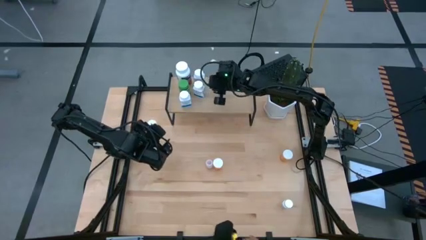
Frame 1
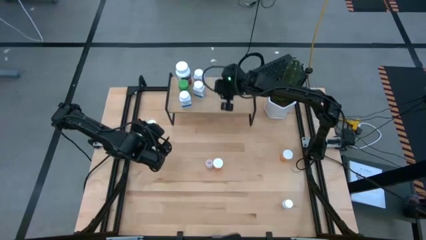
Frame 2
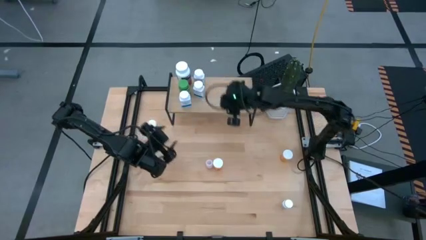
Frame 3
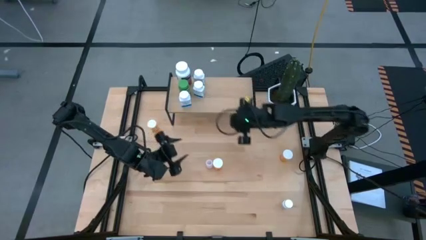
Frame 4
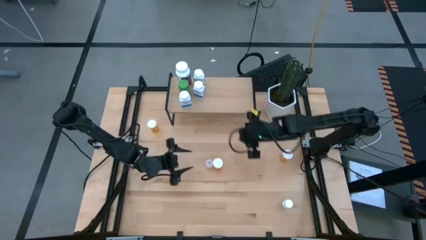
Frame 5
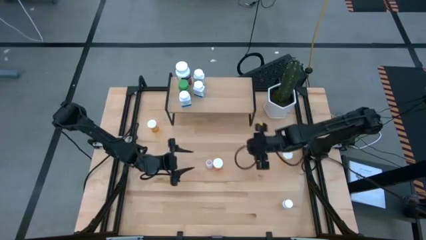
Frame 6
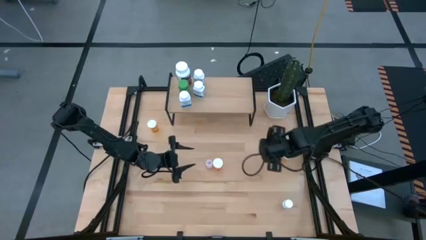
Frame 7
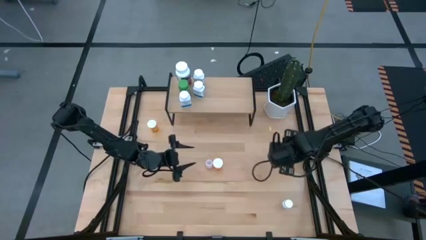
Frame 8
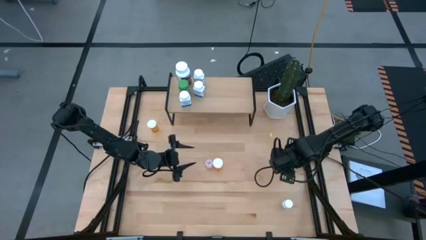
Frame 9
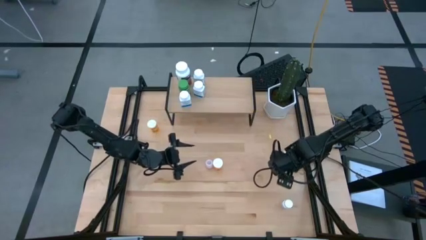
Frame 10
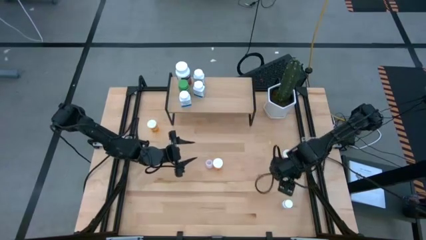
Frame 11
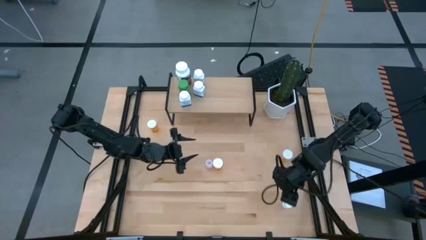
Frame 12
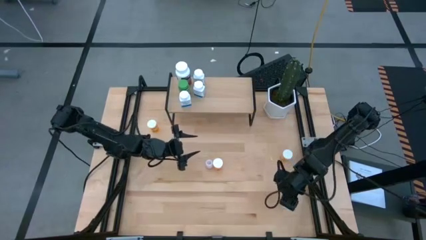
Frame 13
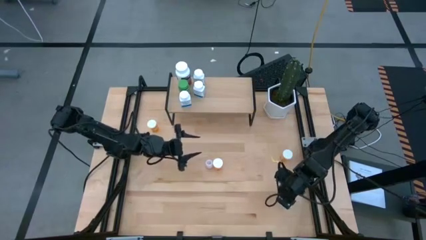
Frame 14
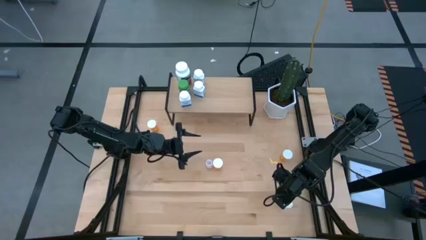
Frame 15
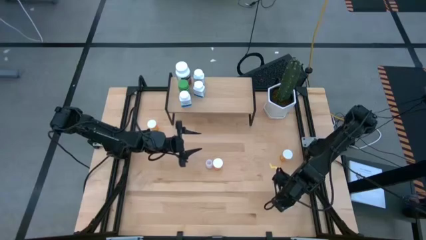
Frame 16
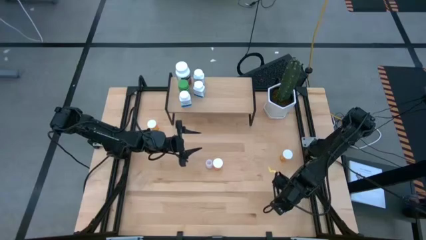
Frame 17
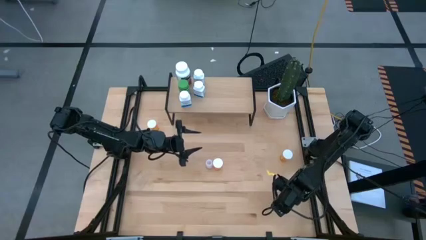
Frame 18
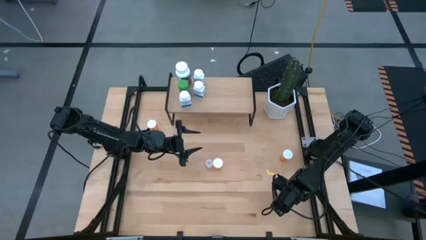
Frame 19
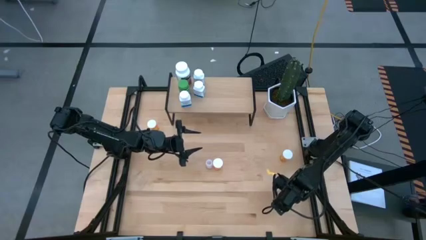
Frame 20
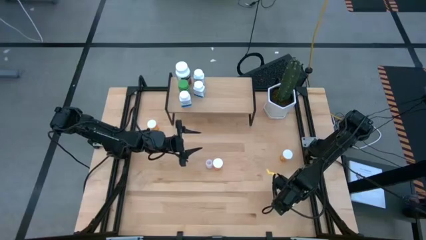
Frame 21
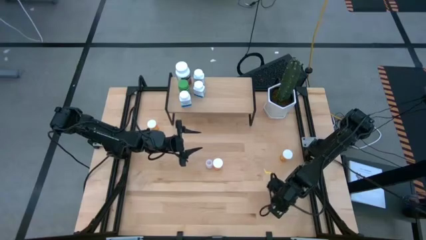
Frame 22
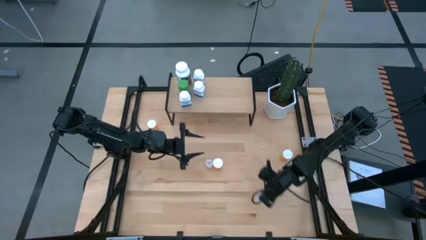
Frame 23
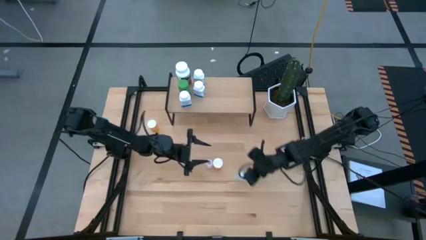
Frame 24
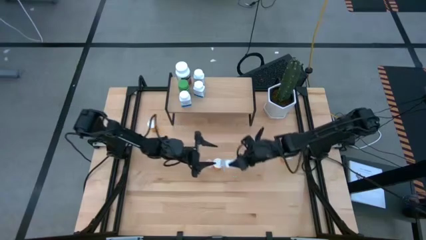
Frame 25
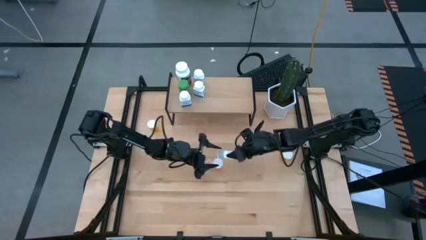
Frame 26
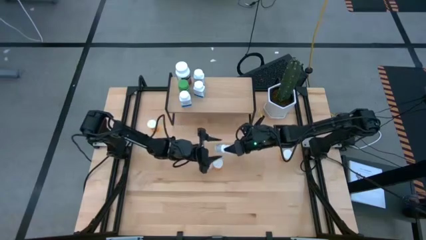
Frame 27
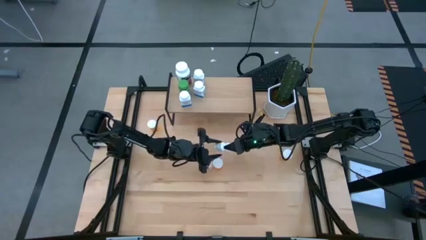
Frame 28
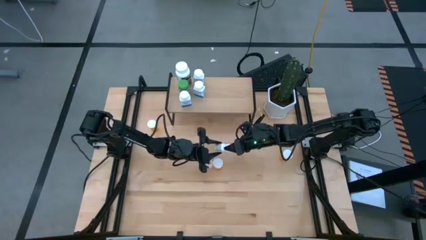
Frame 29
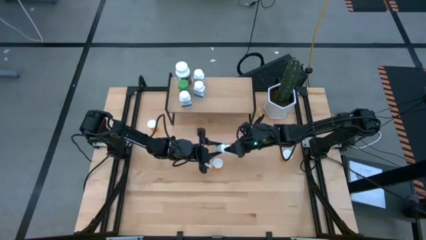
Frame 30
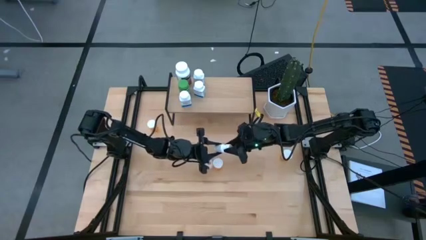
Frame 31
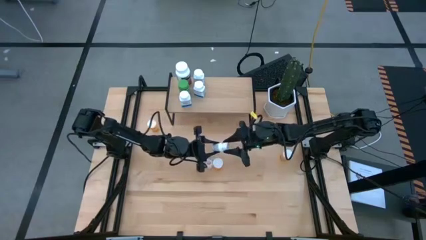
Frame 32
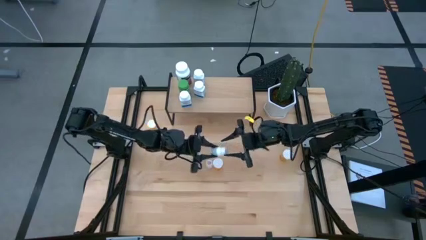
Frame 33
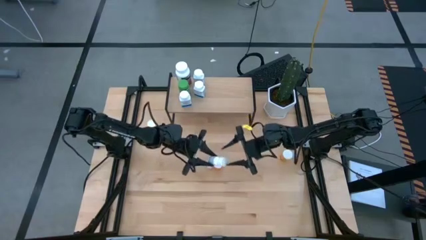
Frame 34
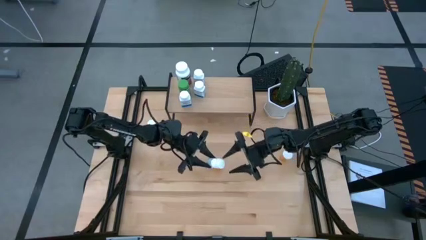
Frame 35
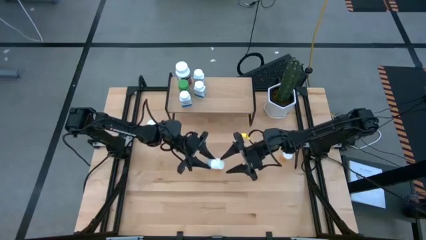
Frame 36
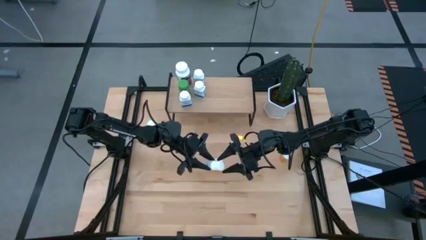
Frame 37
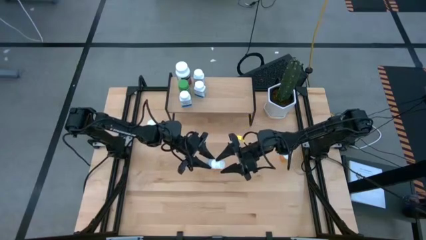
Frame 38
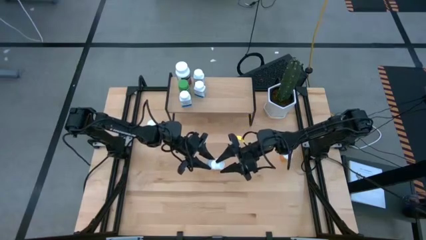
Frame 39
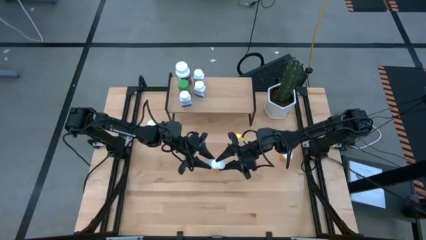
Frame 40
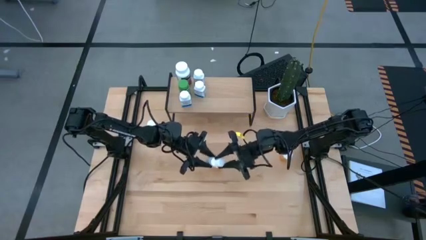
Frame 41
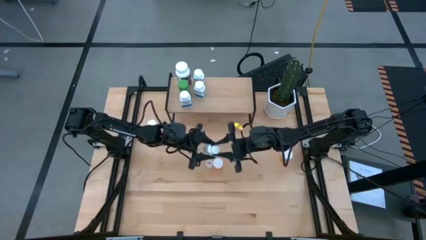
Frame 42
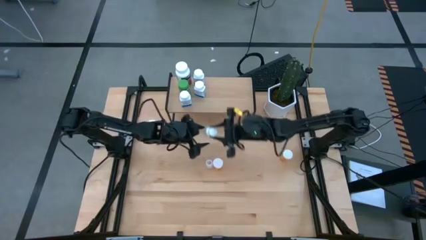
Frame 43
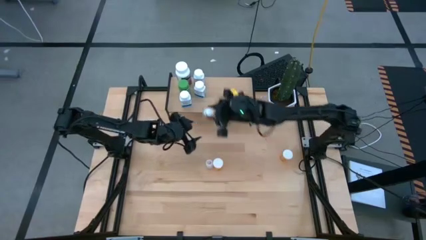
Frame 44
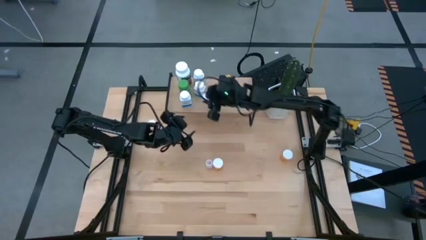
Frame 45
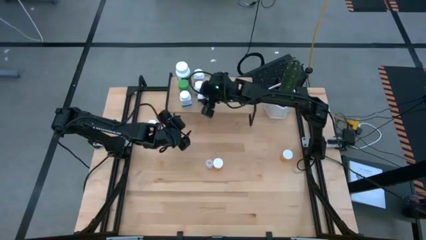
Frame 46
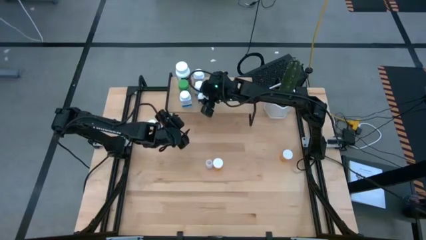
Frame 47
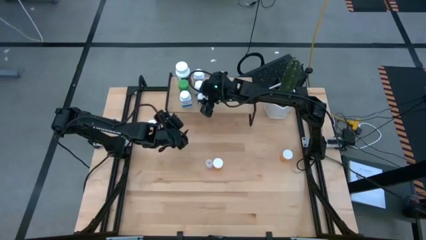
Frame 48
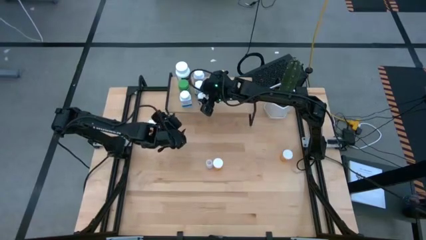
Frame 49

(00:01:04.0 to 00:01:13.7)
Task: Pick and place medicine bottles onto shelf by color
Put the white red pill bottle on the shelf

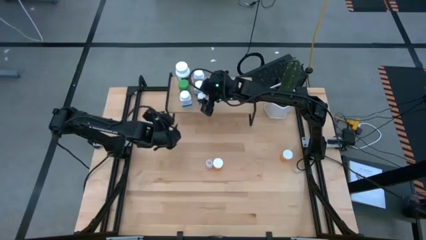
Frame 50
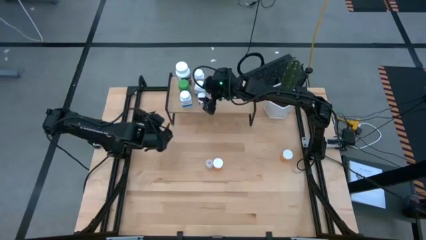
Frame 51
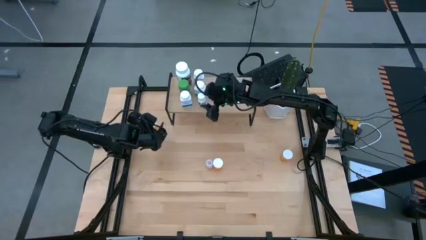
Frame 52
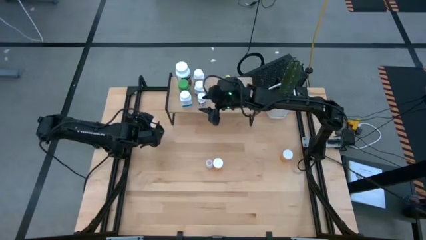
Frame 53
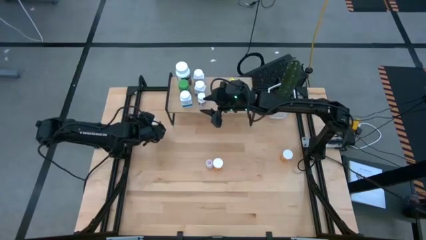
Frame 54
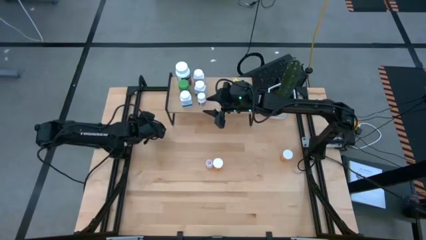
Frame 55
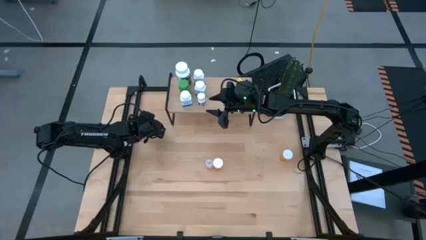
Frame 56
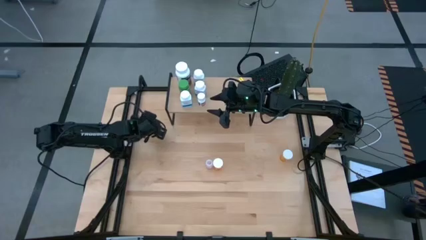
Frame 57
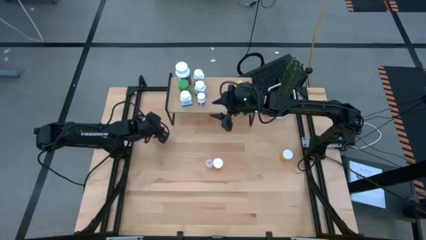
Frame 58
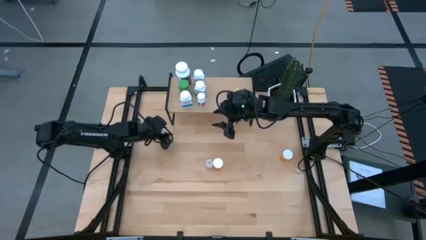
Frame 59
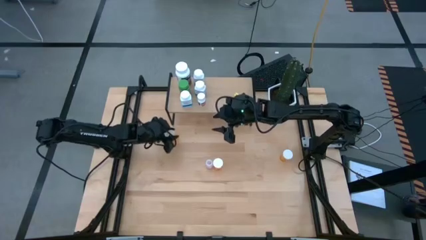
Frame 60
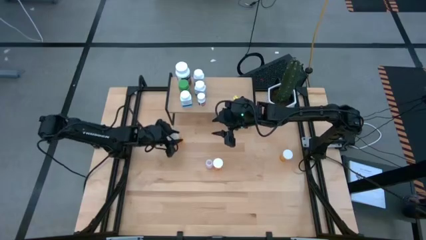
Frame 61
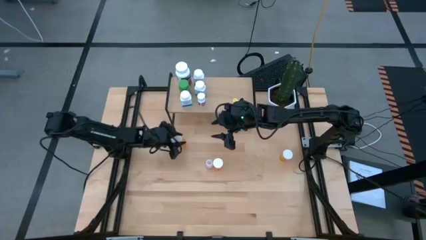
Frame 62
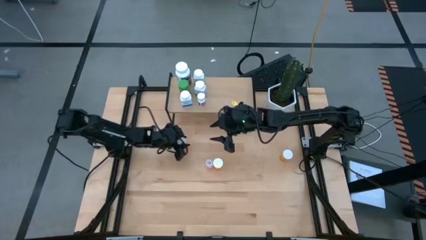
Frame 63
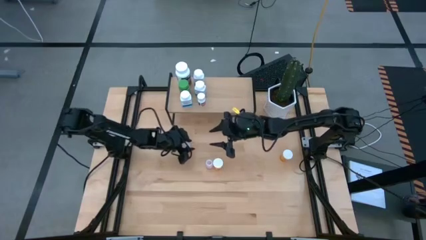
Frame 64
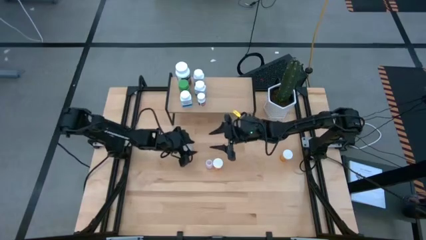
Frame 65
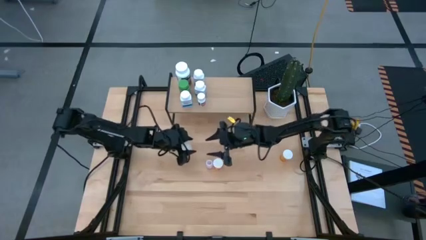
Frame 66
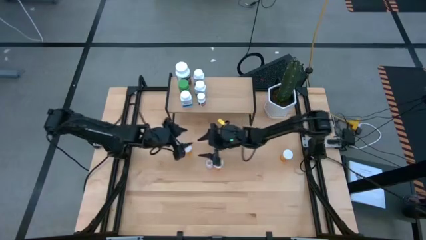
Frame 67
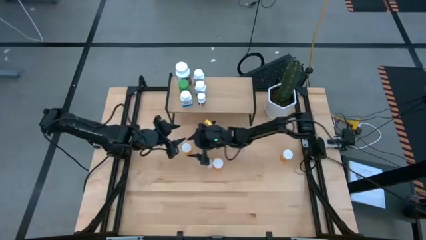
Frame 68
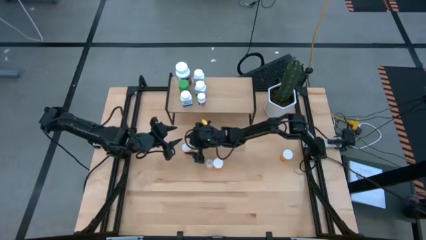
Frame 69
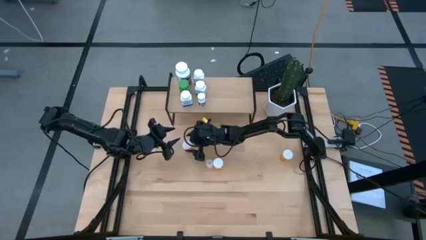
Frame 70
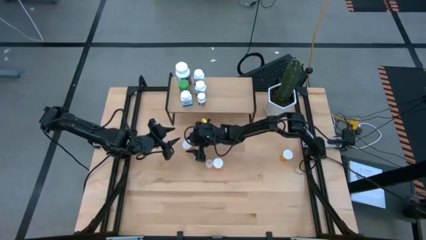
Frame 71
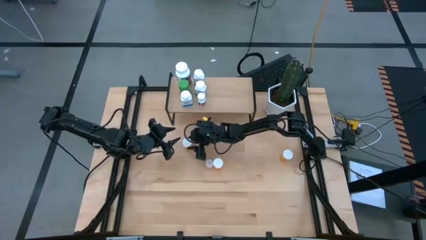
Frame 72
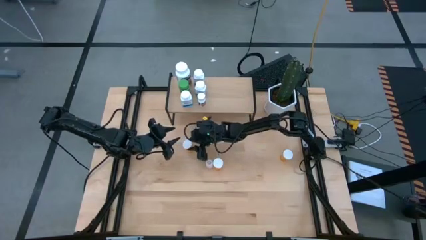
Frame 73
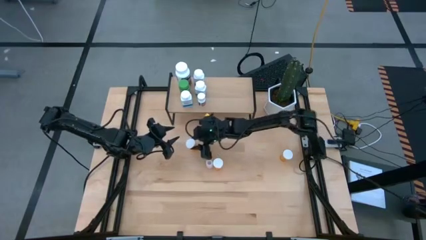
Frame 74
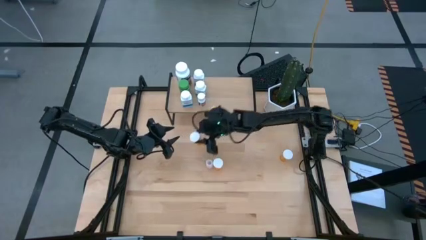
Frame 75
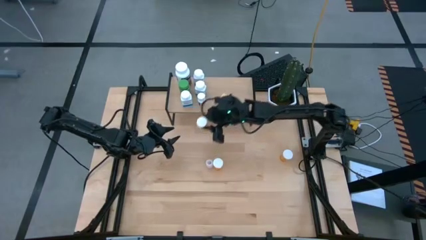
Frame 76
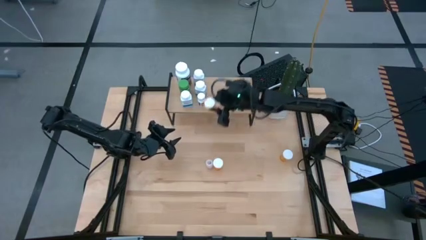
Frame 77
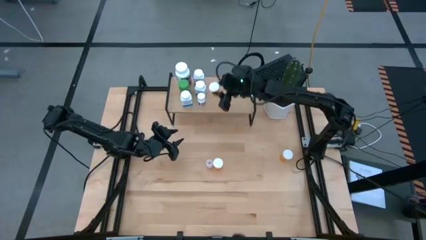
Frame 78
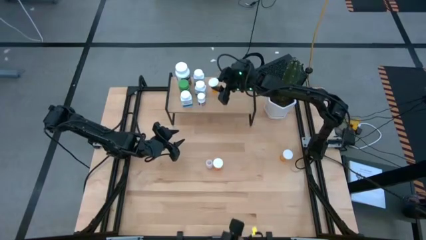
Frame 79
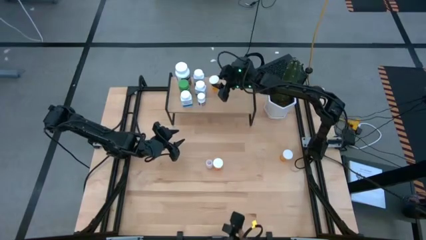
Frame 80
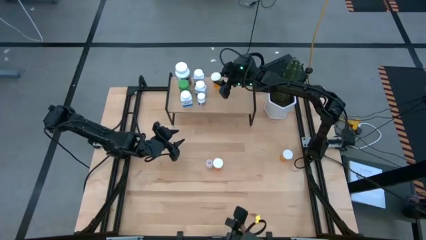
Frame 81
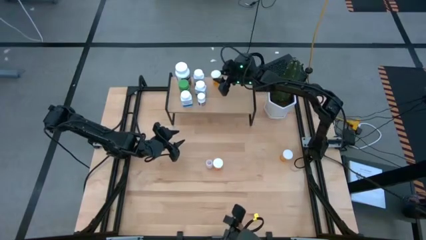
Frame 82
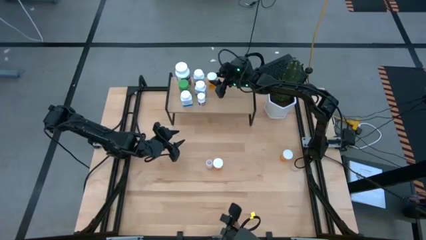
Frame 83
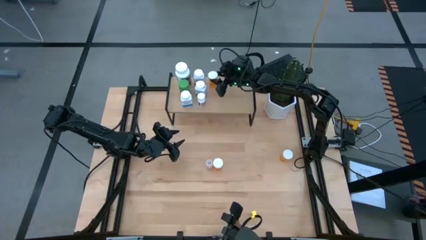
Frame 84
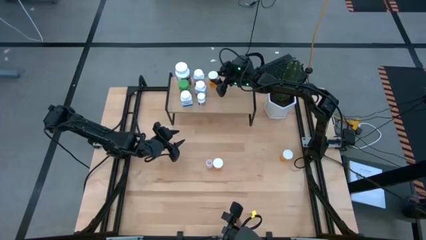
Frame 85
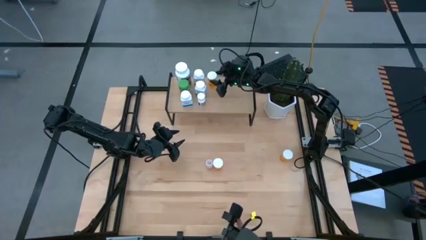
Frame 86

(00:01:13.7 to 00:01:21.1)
Put the yellow pill bottle on the shelf
